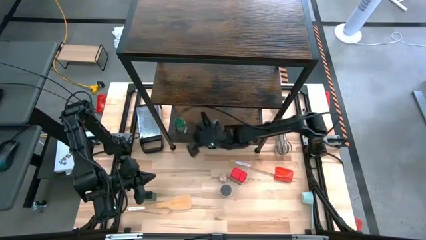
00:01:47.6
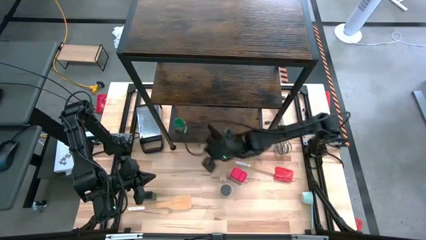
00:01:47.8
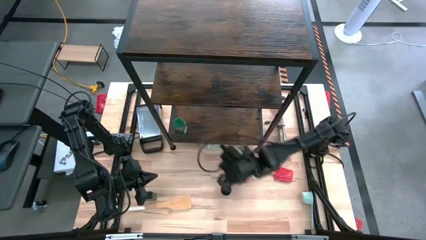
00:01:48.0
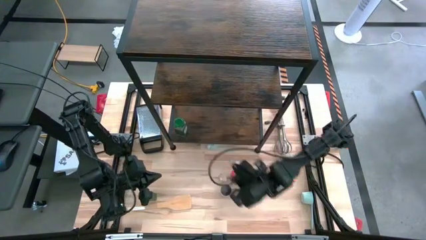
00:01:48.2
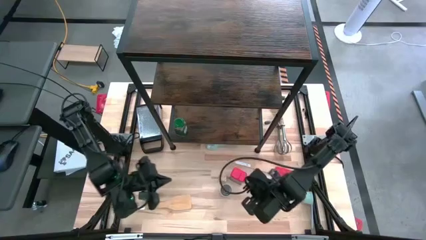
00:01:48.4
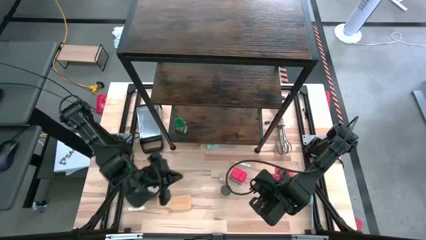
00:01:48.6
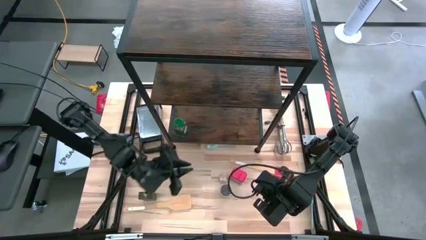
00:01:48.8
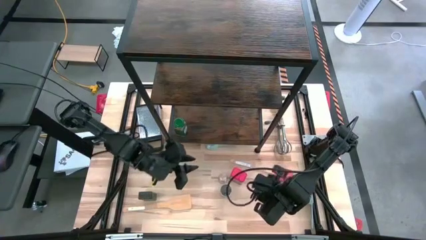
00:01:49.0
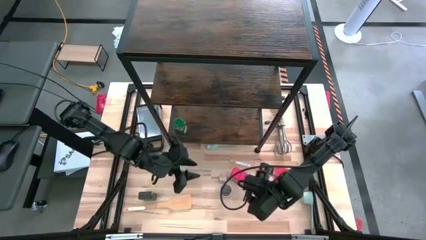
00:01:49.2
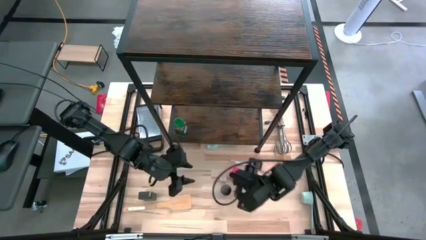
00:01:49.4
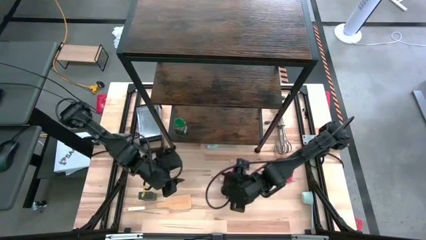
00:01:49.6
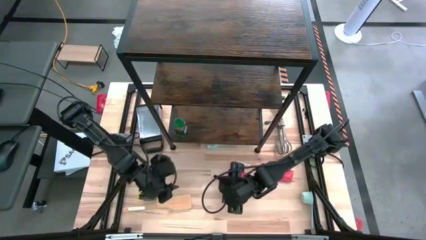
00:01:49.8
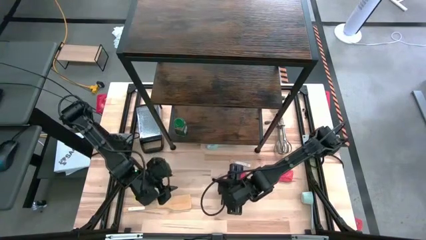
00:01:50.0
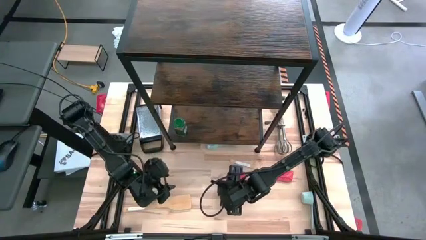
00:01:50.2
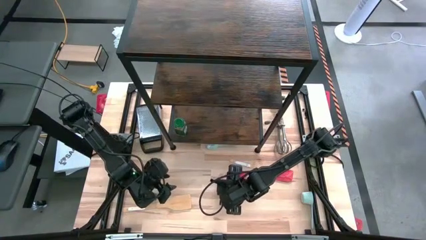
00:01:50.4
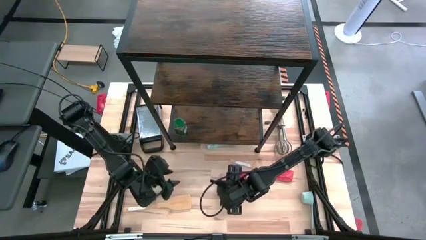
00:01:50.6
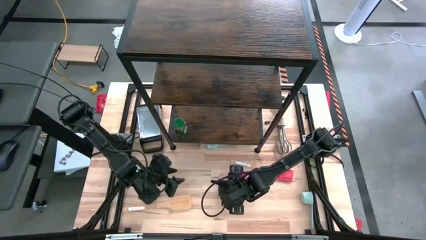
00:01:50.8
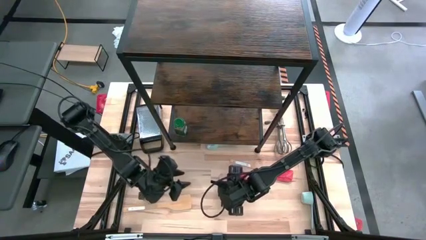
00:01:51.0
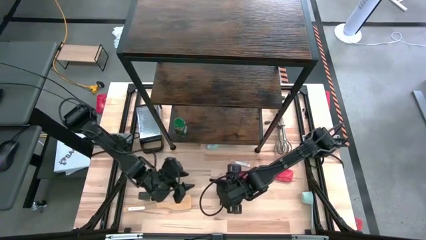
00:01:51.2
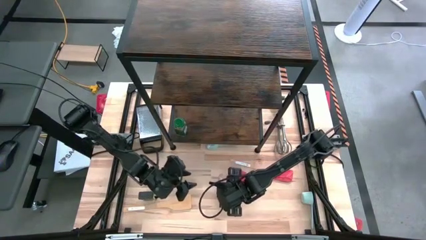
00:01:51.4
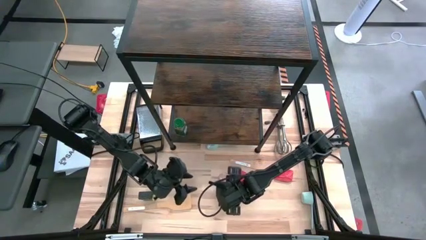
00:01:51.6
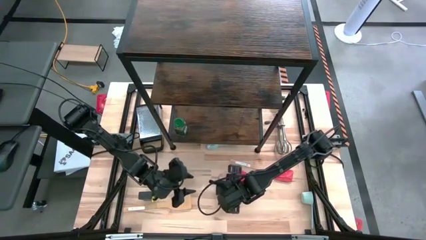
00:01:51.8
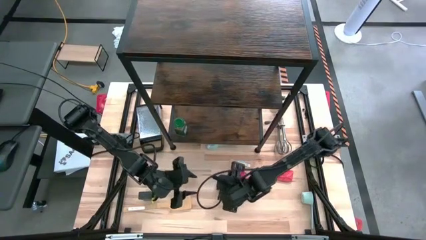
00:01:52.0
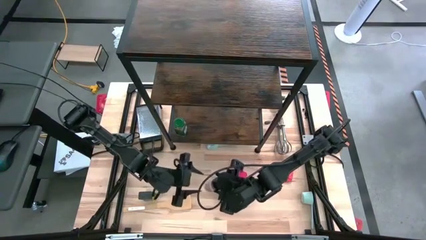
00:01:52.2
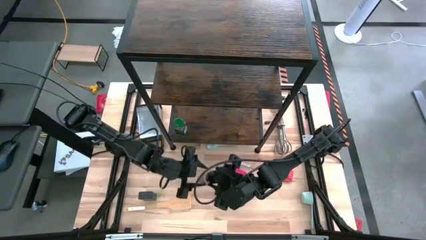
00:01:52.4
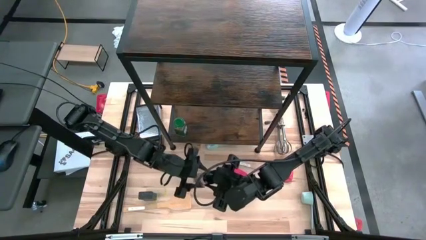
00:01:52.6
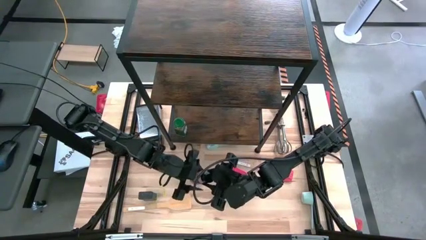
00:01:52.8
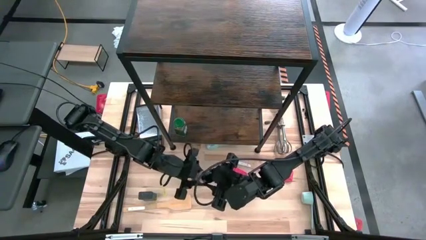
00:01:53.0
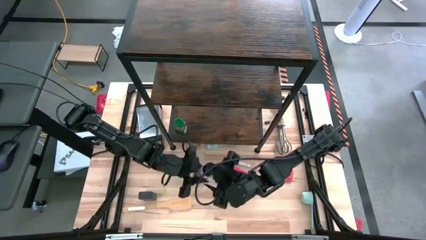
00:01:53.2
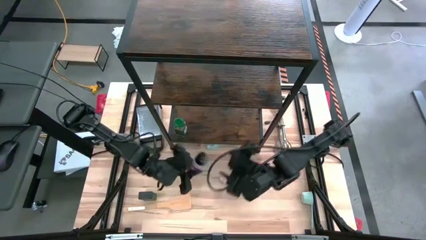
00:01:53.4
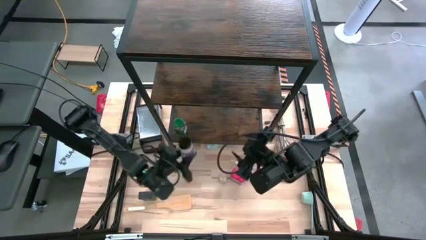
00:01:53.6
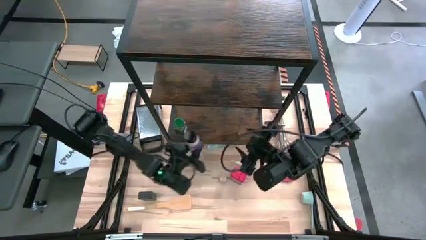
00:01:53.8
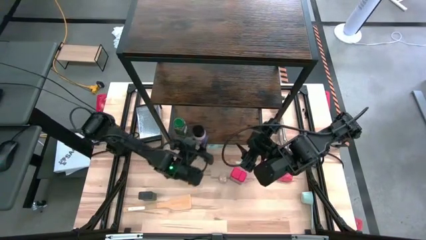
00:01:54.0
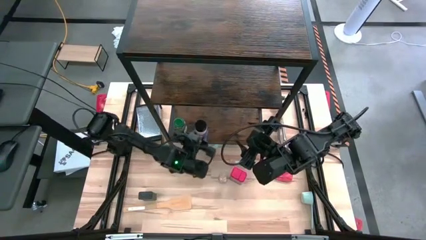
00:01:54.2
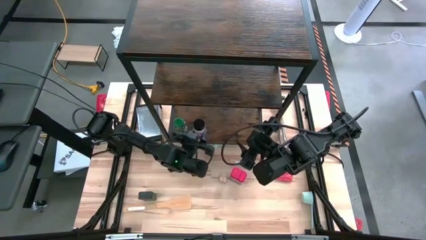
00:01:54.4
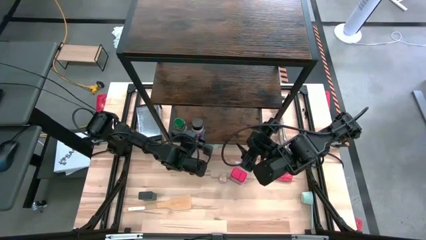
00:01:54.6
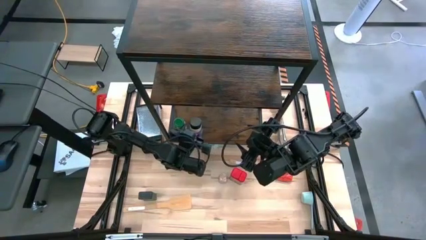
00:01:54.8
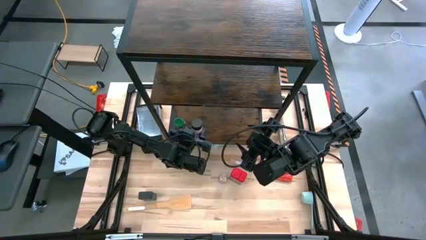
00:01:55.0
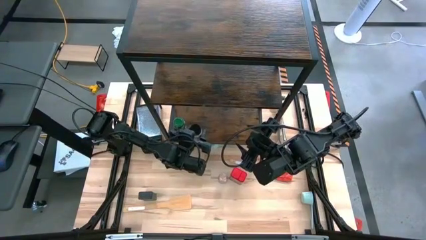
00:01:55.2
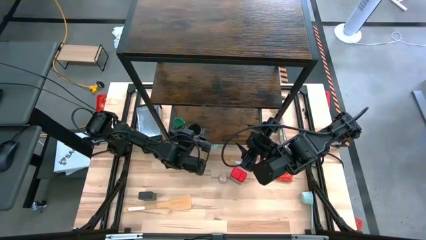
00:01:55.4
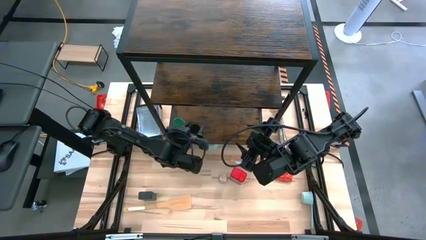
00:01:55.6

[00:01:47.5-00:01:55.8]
Task: Shelf spices
Put the purple seasoning bottle onto the shelf
